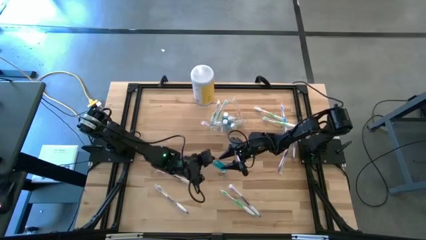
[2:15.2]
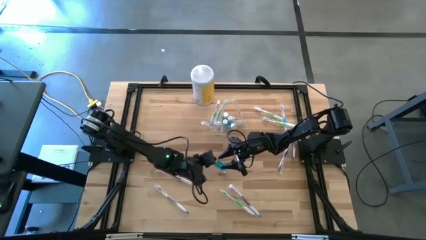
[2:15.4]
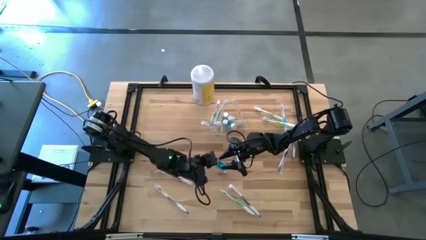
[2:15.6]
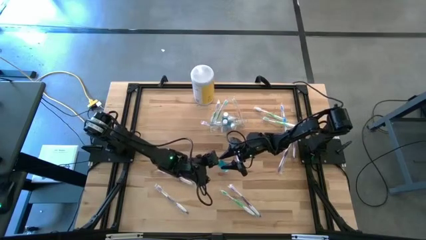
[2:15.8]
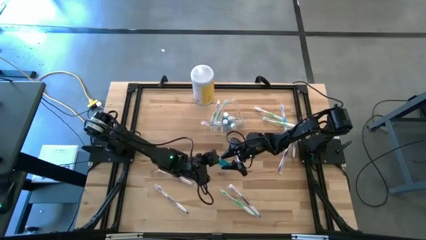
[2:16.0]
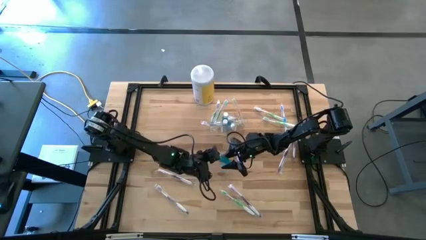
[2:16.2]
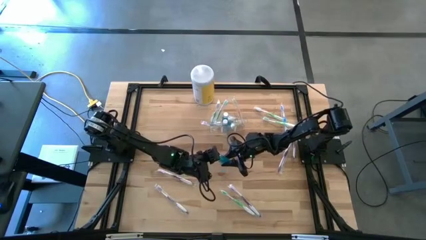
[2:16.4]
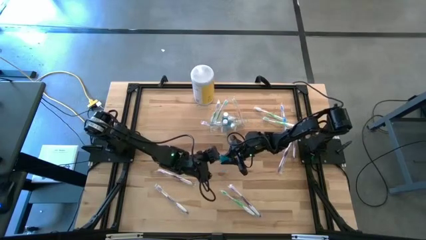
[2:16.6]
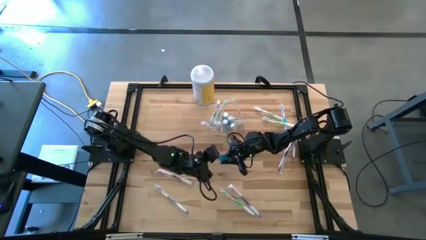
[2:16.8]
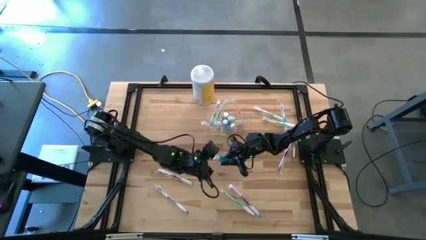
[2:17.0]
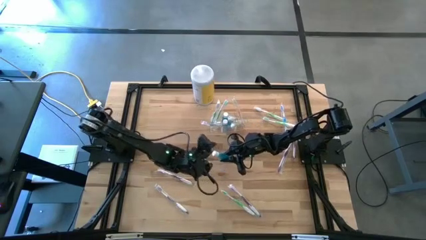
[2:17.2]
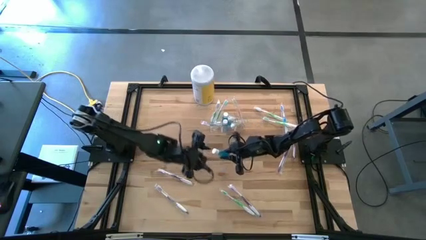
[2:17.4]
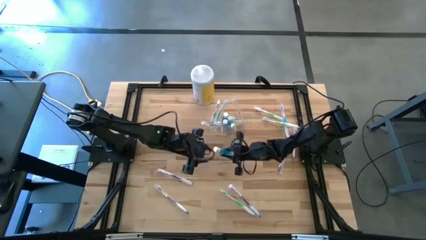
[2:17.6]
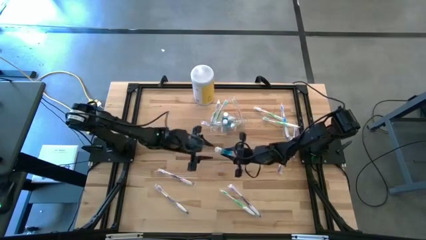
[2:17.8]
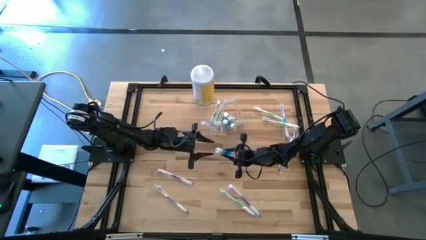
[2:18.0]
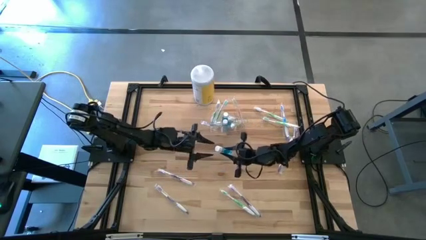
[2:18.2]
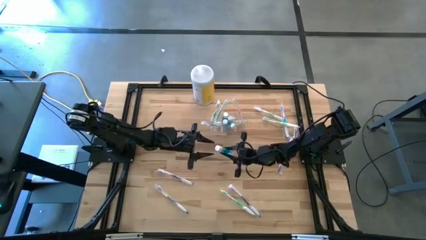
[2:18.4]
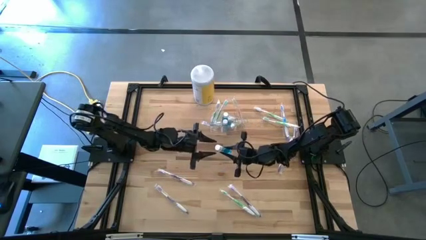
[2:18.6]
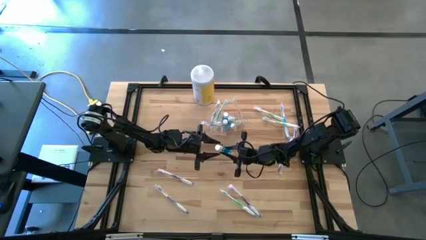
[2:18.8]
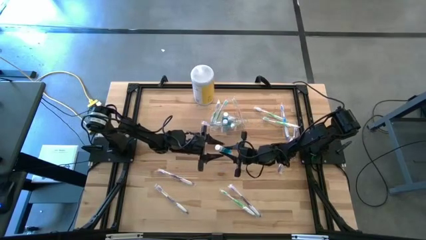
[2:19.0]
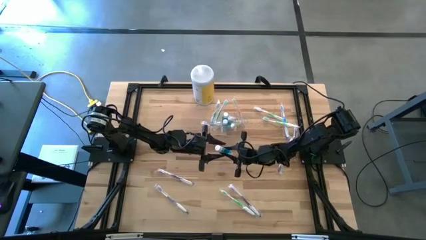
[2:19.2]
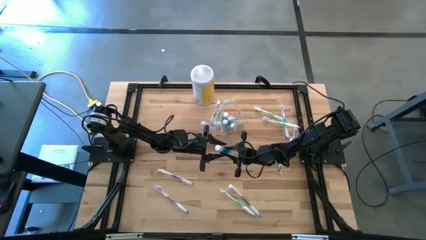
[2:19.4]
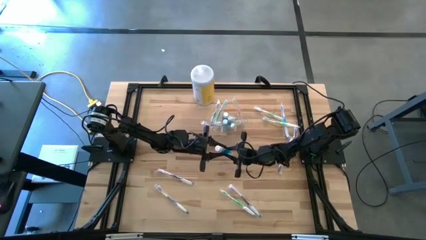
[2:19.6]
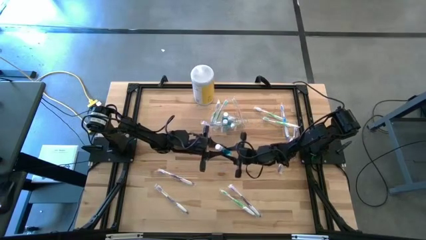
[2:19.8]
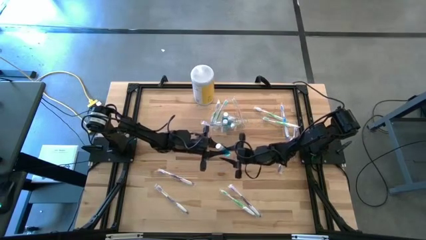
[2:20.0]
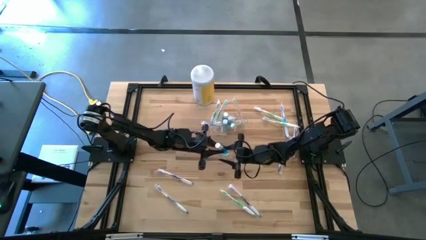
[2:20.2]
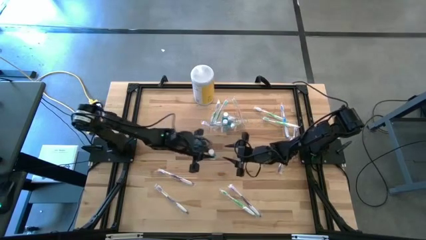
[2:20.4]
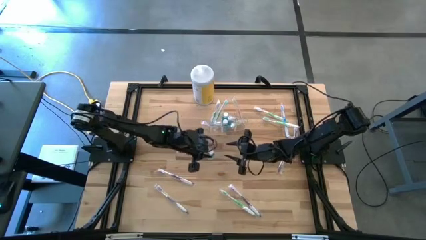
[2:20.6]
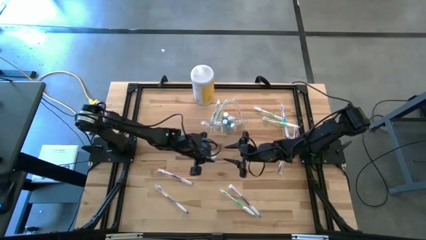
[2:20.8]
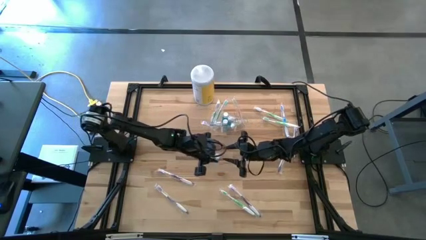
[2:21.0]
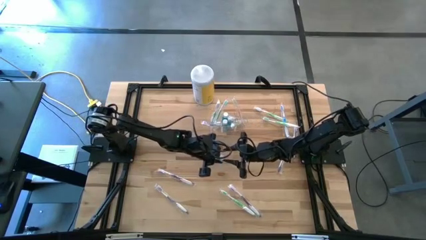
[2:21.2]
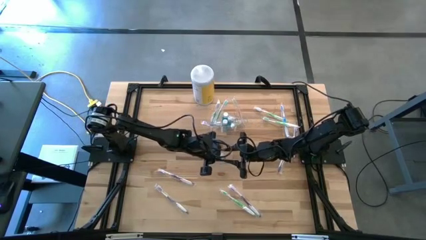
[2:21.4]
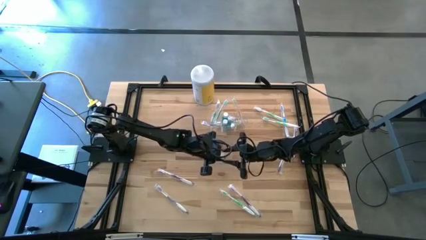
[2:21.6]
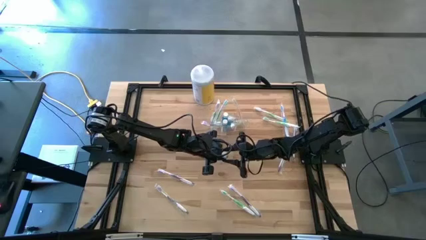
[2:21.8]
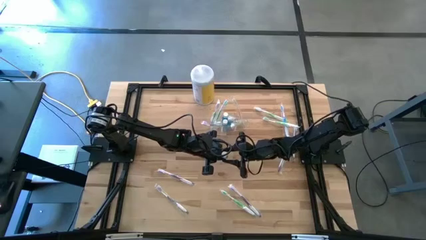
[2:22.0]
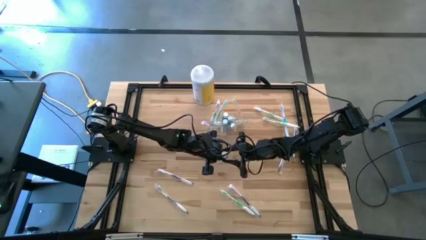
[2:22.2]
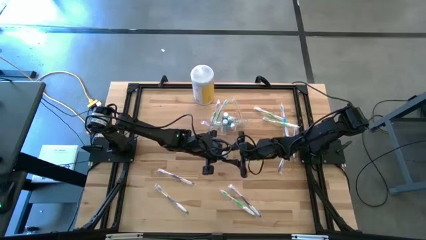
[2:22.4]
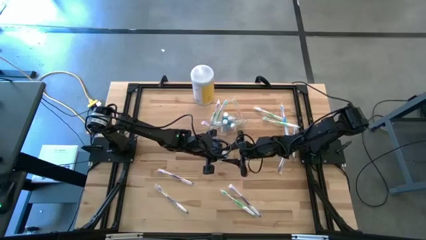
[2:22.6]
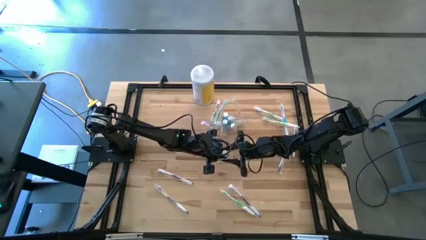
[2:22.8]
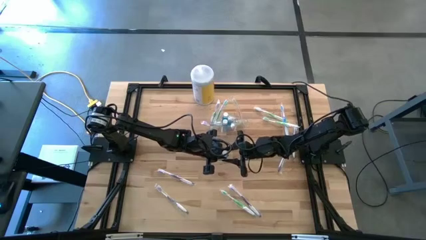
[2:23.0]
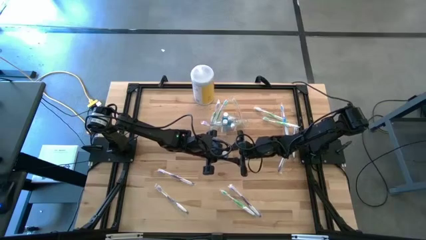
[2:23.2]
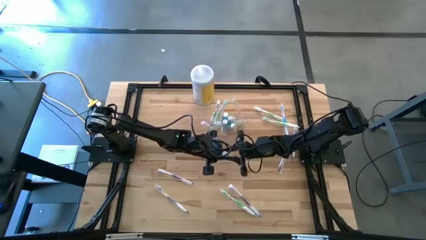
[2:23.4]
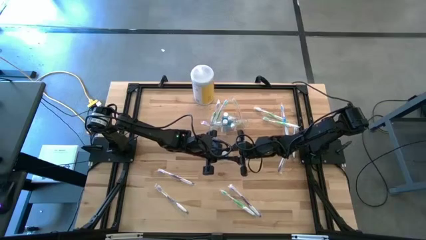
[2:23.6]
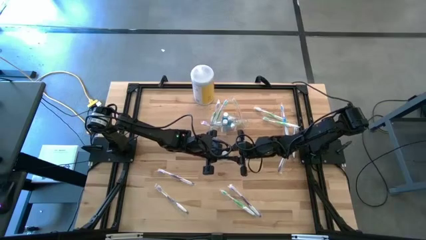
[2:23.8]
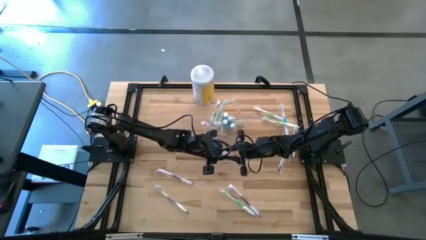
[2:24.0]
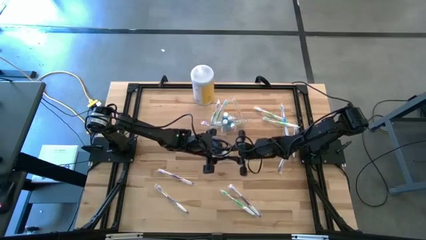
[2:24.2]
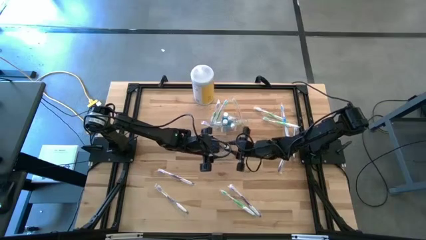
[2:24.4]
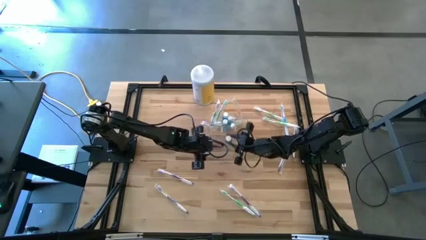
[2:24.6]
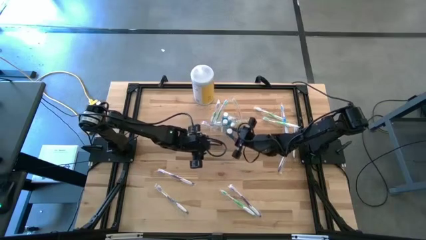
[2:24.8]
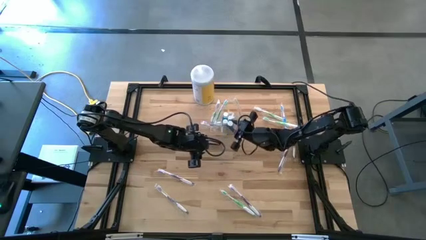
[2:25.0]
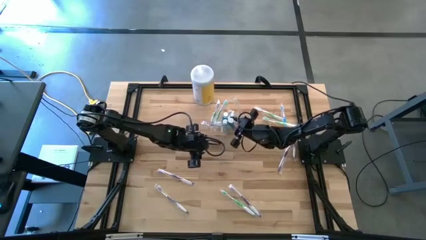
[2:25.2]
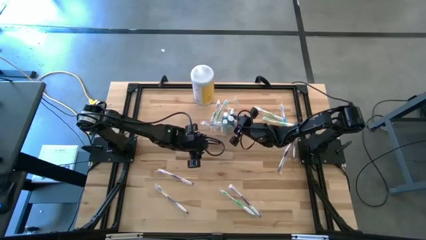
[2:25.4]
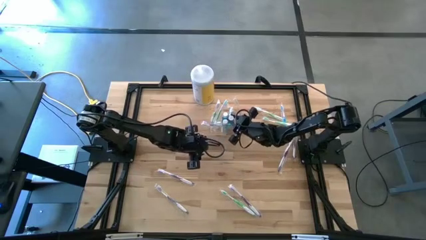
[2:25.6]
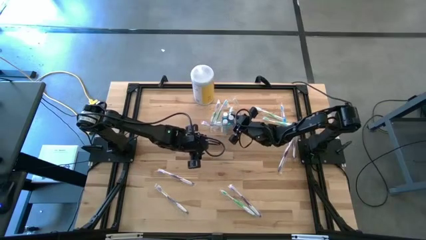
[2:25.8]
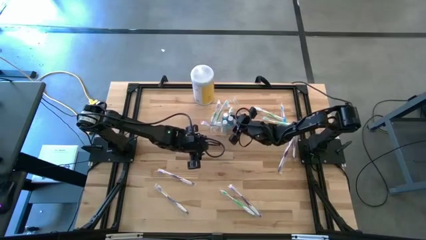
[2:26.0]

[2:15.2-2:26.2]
Task: Pick & Place toothbrushing station
Put the mouthwash into the transparent organizer

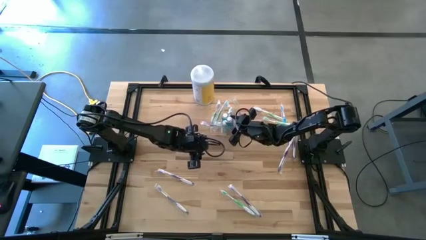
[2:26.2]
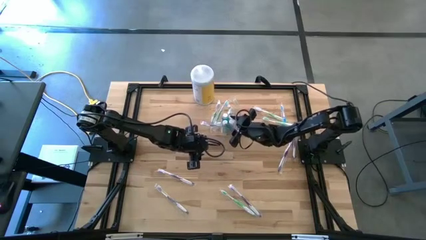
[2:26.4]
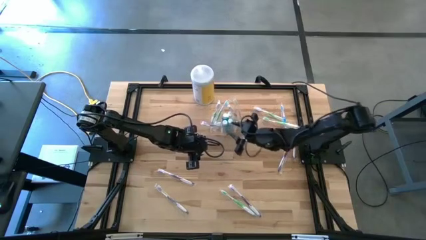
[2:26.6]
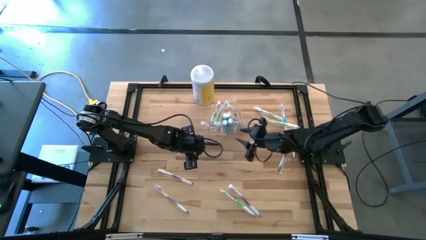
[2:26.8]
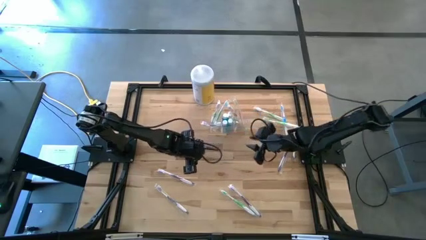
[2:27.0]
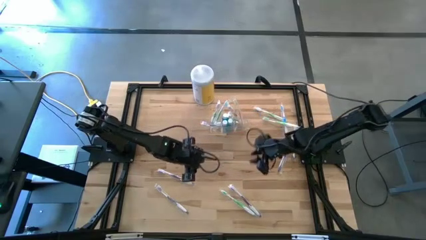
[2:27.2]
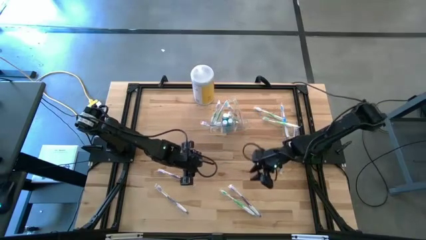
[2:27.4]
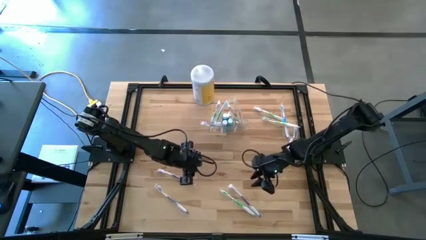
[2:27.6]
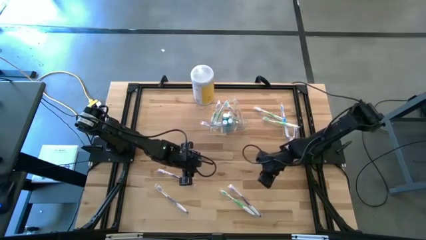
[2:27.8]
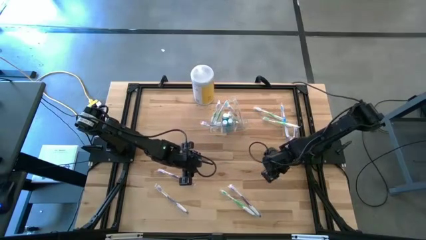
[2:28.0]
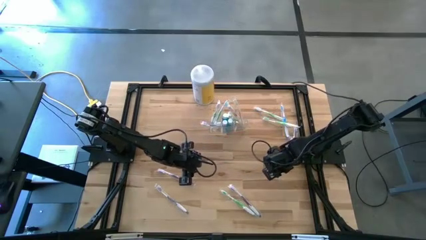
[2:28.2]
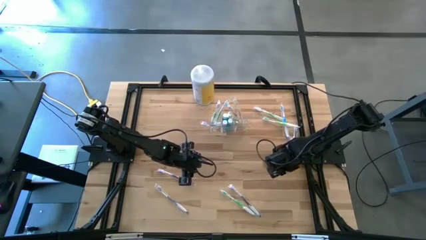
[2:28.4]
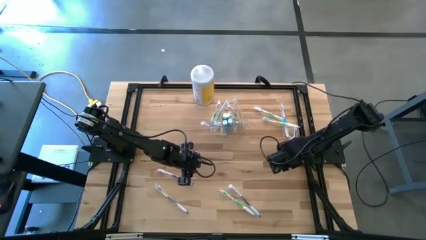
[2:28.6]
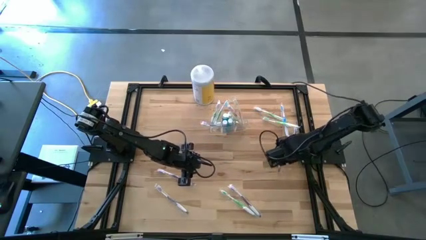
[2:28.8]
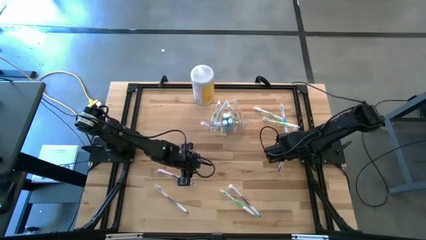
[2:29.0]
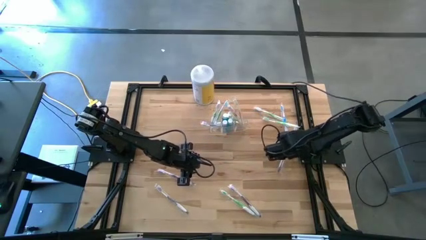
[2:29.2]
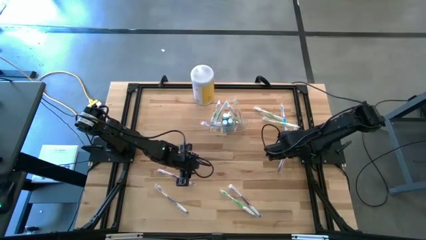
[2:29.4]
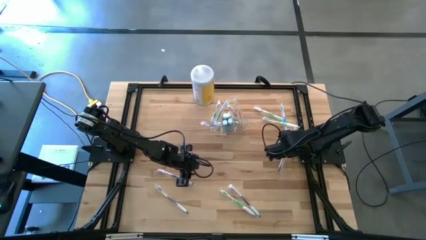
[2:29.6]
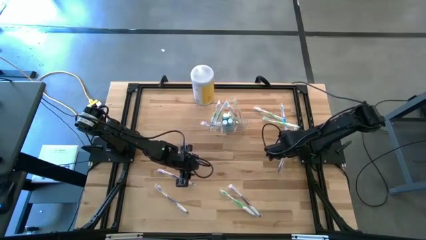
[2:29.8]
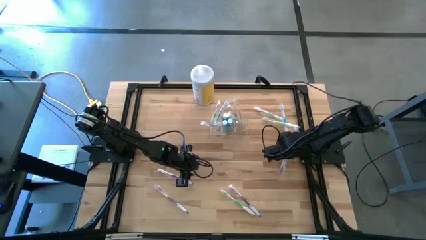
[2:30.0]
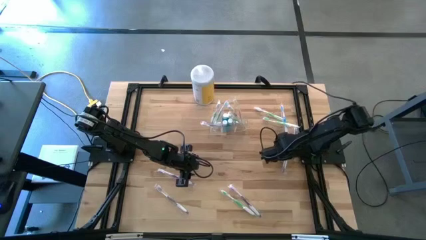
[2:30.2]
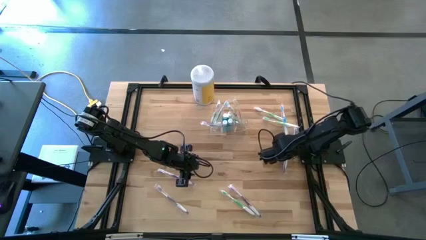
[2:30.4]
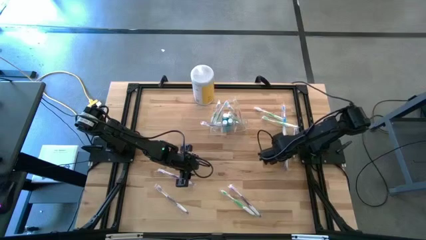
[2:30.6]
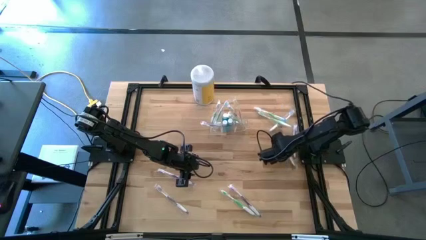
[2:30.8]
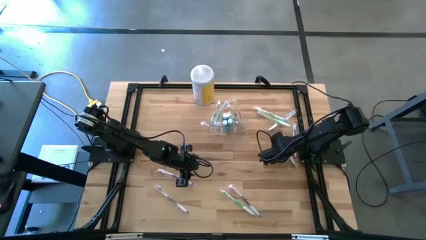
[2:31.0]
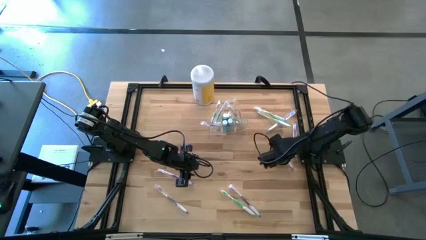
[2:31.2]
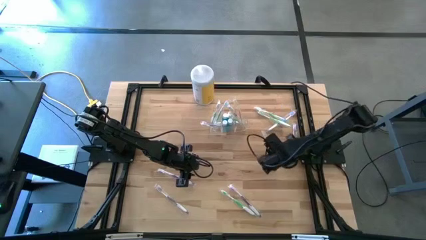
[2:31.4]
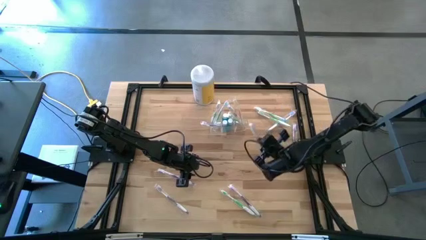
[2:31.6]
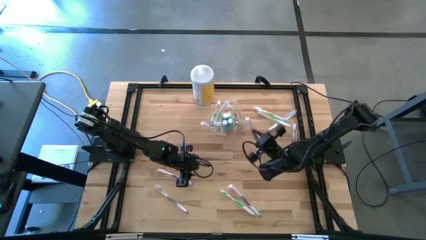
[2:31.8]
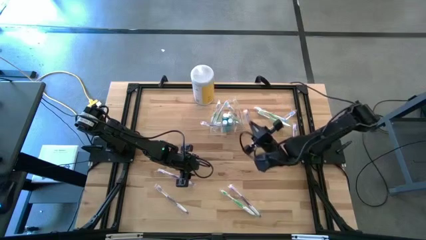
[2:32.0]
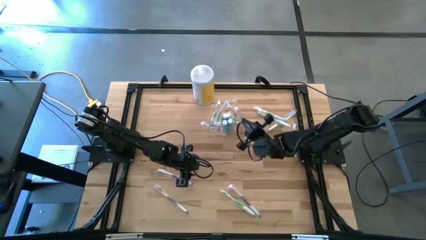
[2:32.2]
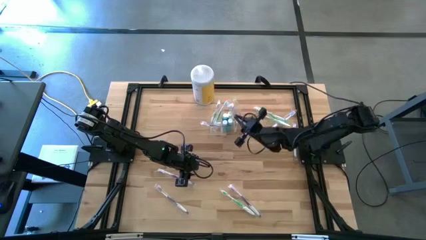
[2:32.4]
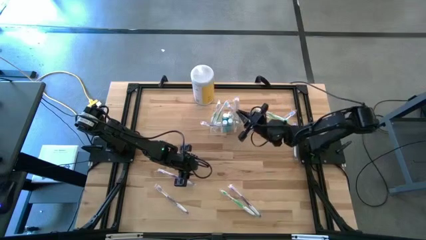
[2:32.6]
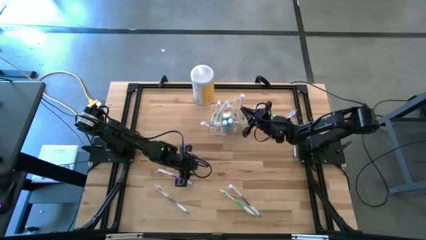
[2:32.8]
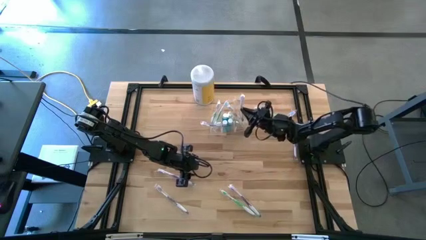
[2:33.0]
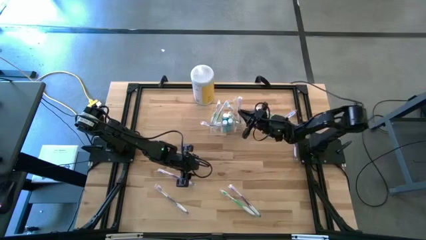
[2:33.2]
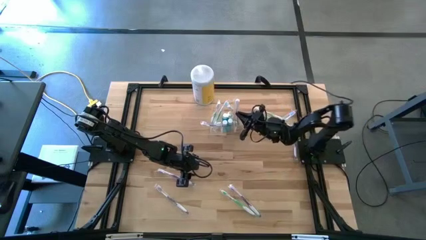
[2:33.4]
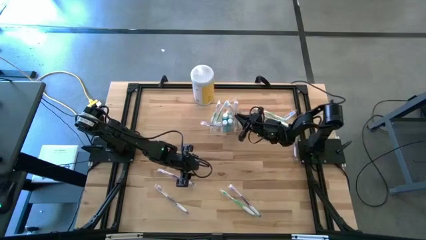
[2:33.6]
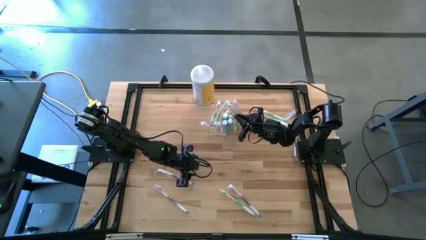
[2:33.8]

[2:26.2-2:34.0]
Put the purple toothbrush into the transparent organizer
